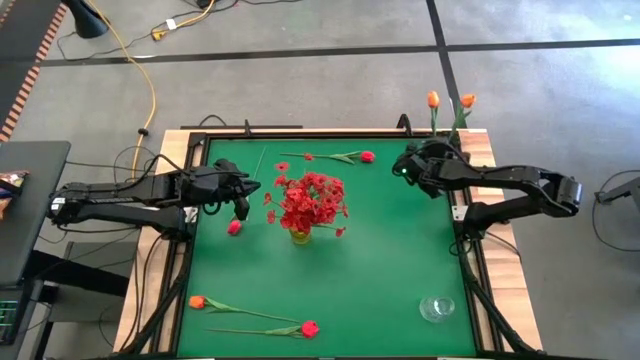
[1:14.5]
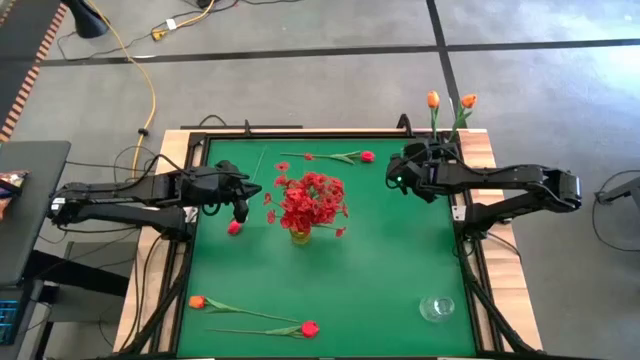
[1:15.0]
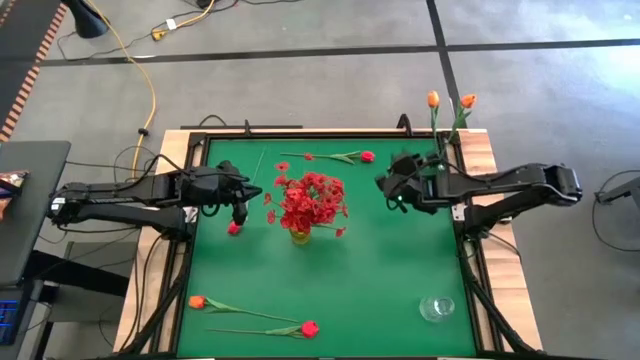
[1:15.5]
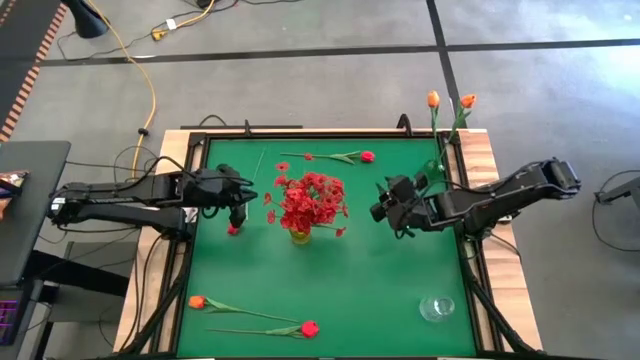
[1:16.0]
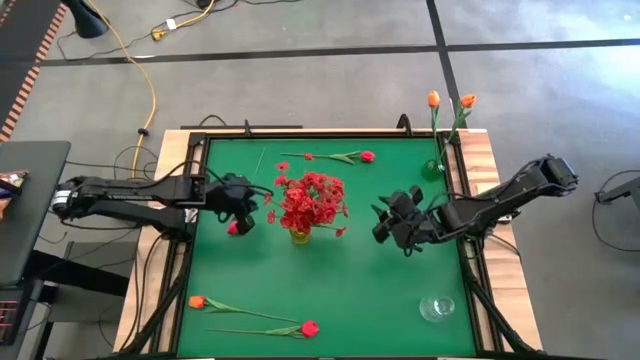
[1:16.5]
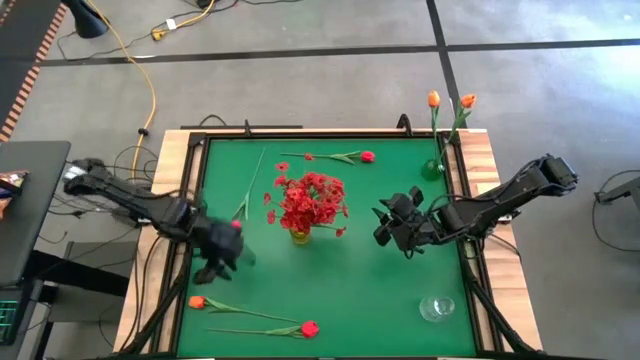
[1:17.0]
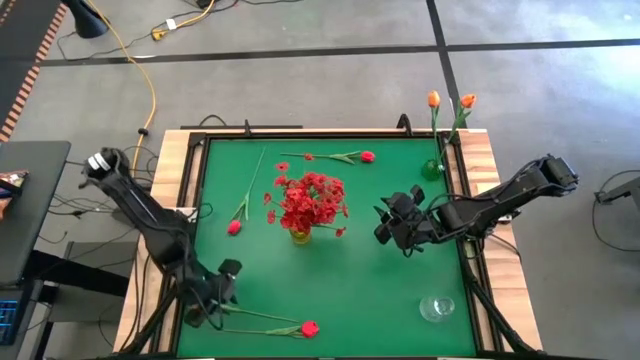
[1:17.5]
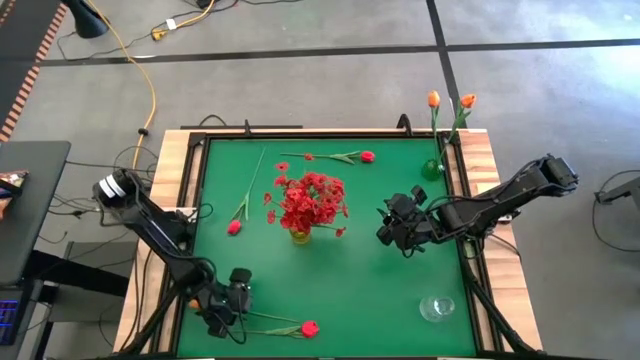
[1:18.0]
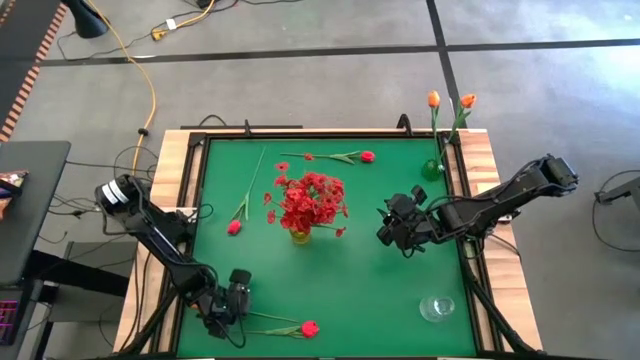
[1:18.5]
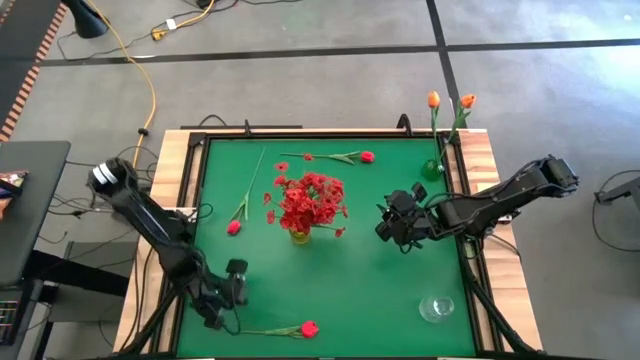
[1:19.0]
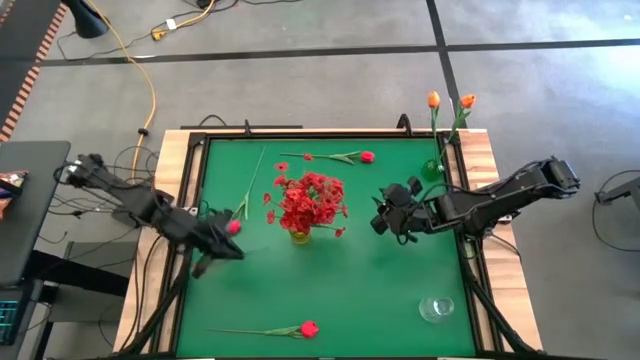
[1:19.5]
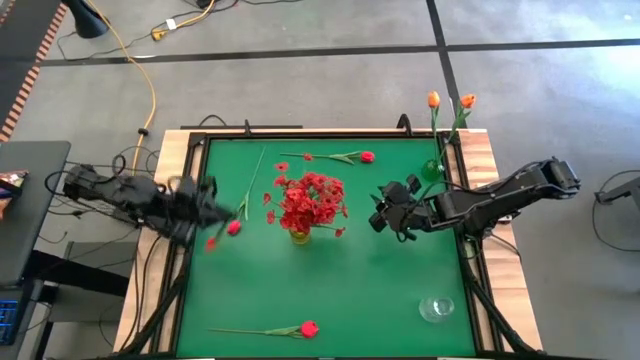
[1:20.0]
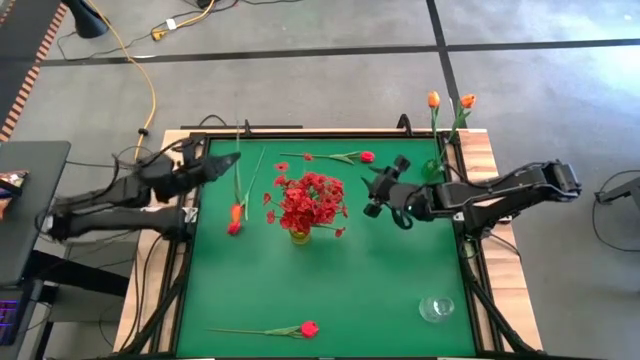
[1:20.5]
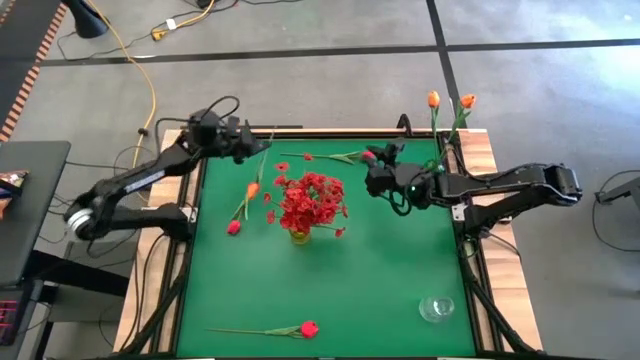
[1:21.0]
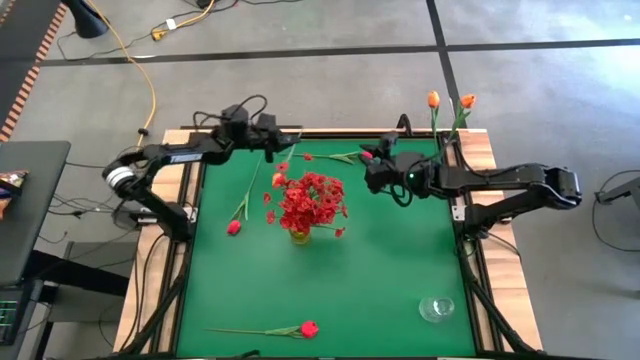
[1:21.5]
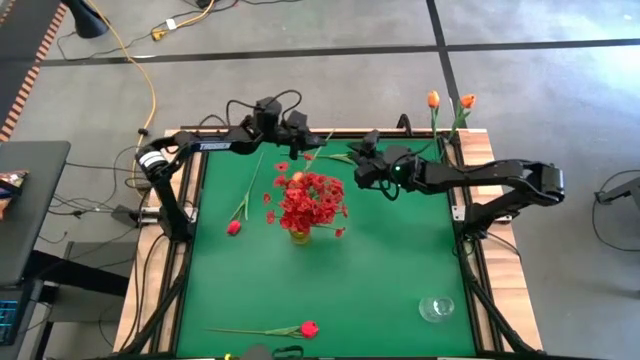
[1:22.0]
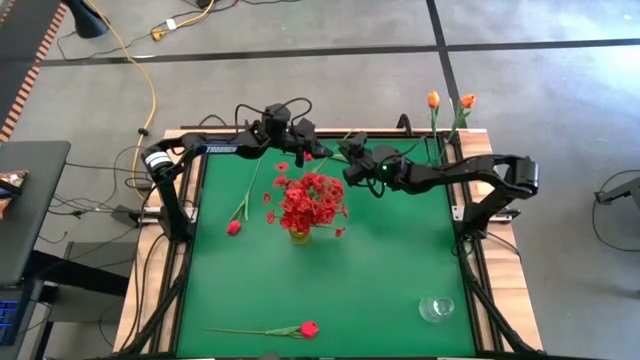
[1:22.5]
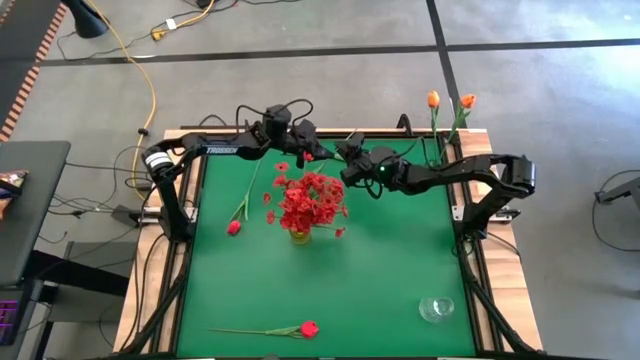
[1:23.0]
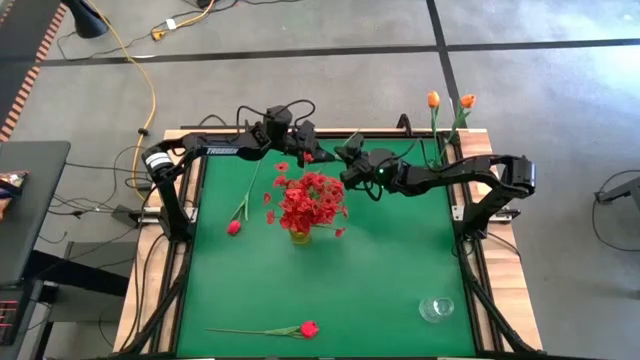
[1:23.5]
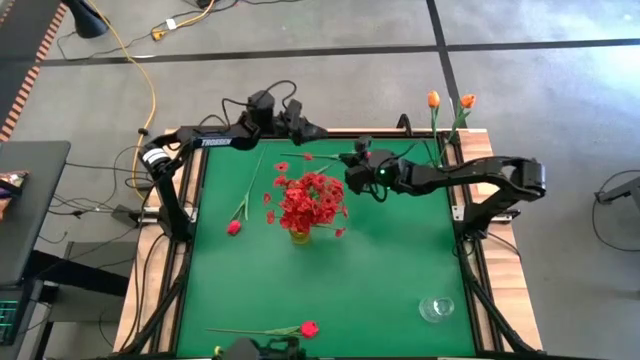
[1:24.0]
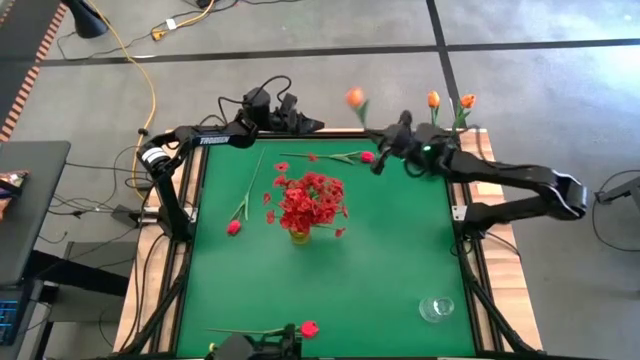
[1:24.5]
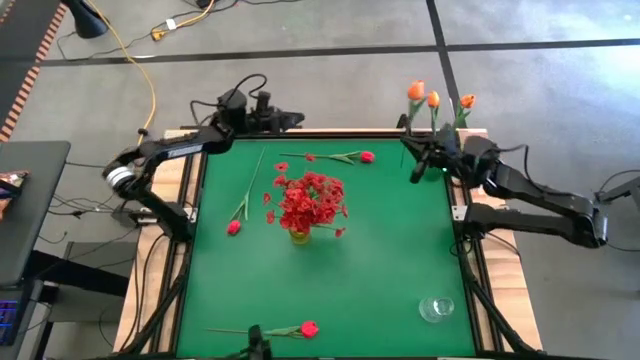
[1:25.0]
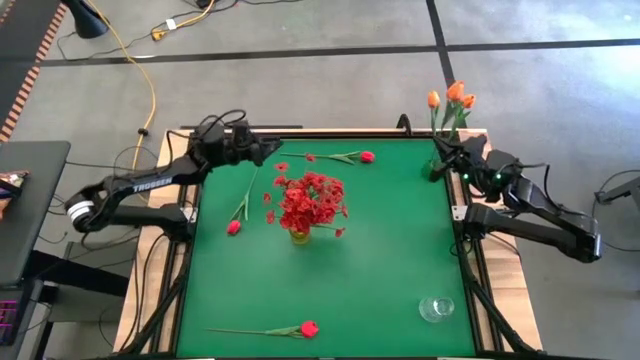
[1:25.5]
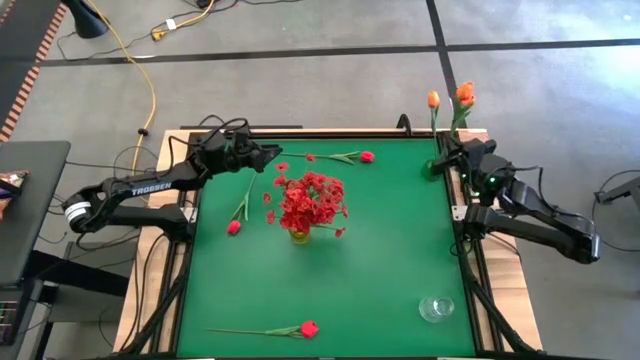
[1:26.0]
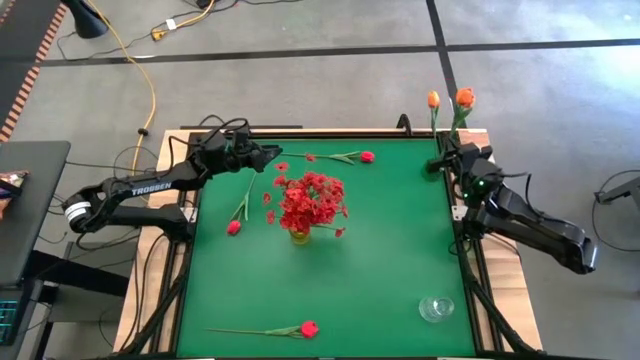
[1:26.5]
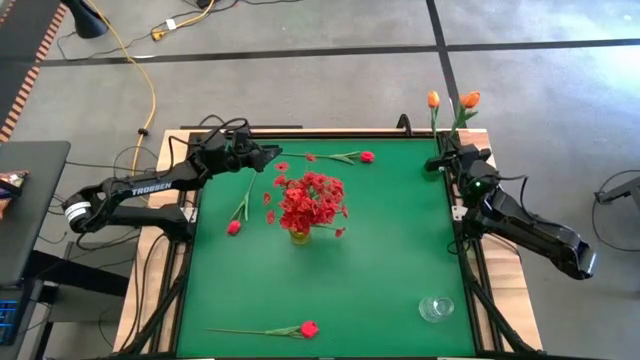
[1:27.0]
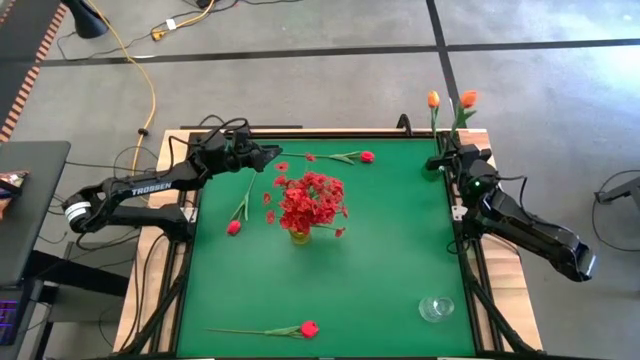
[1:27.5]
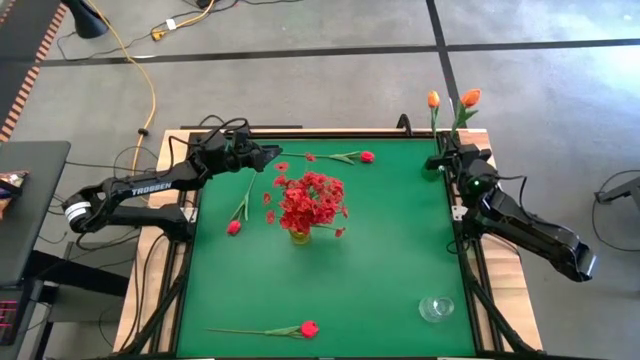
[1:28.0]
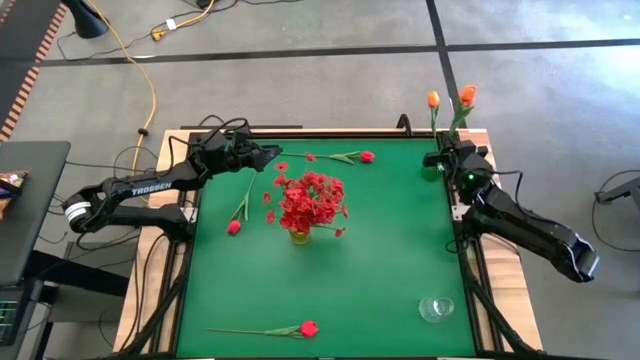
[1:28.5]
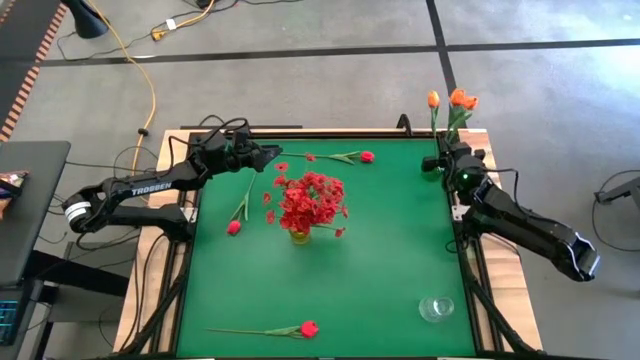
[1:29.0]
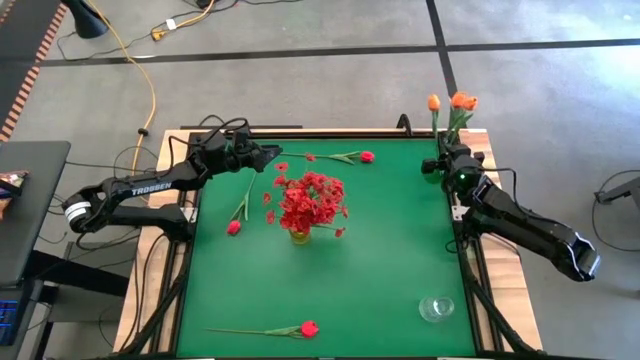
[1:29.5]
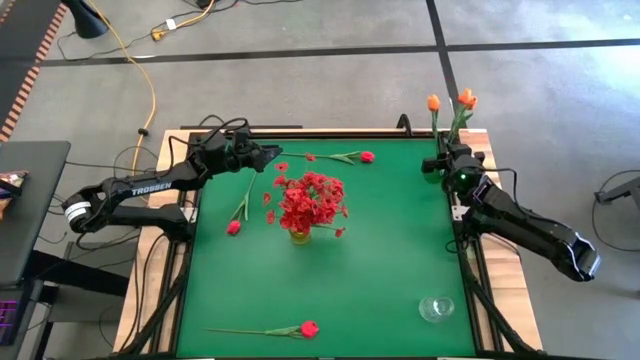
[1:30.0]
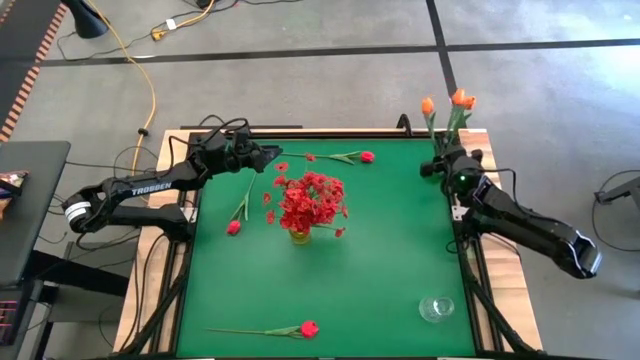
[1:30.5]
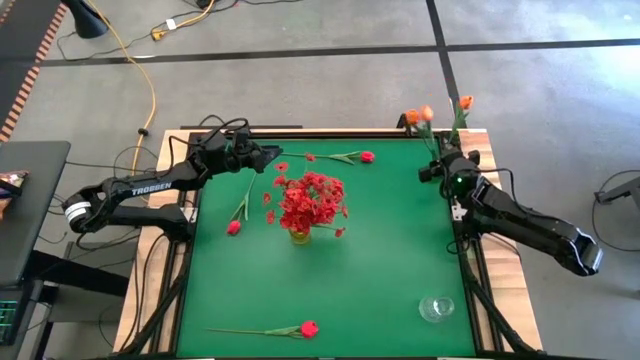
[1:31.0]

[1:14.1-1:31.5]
Task: Sort flowers into vase by color
Put the orange flower into the green vase

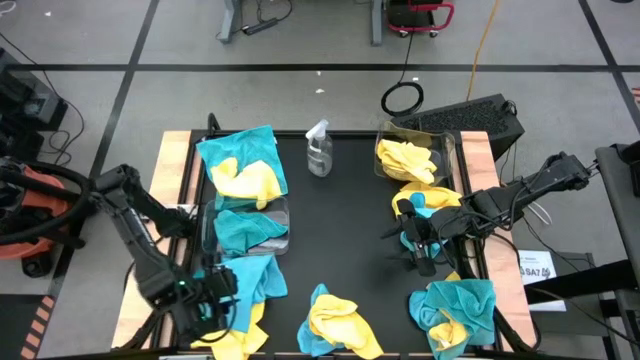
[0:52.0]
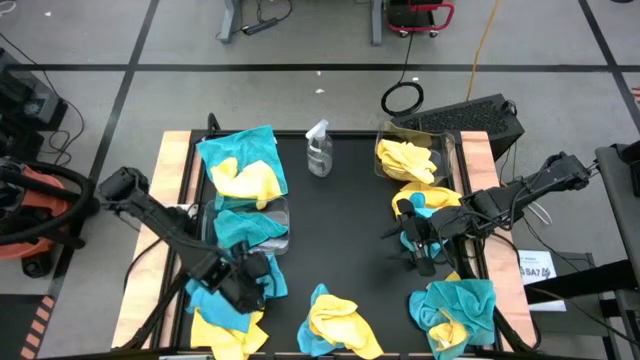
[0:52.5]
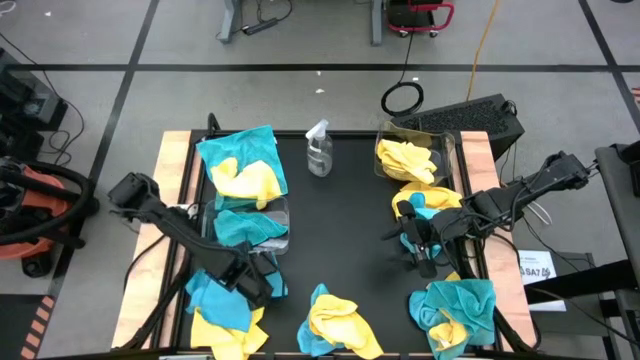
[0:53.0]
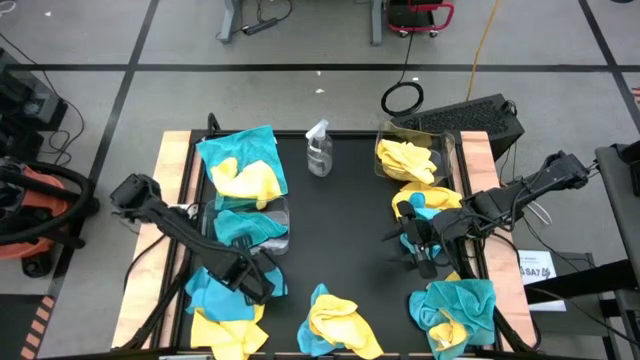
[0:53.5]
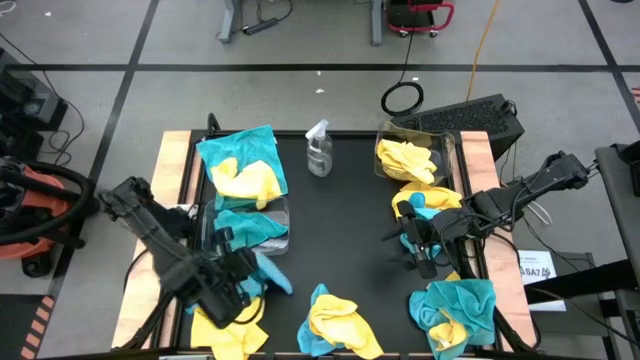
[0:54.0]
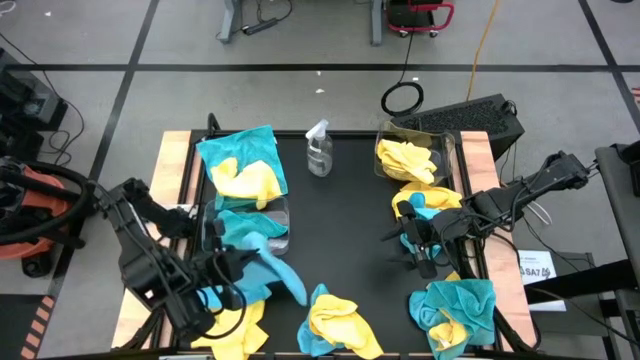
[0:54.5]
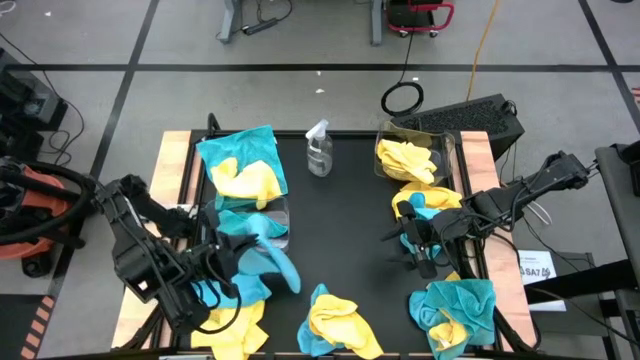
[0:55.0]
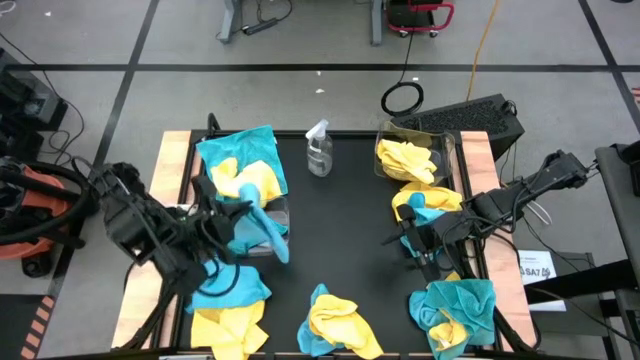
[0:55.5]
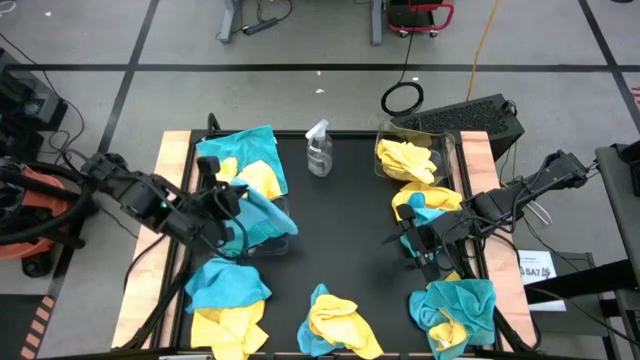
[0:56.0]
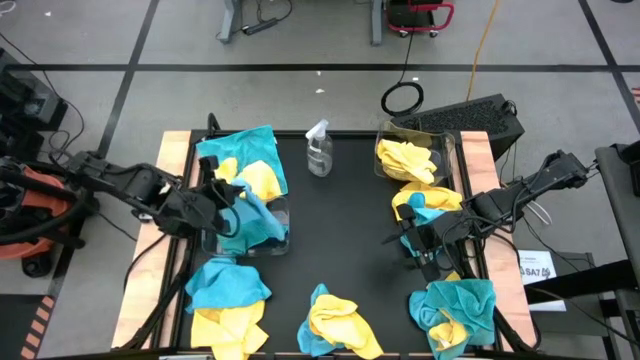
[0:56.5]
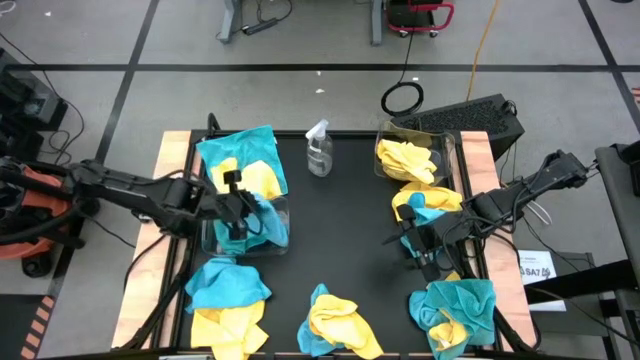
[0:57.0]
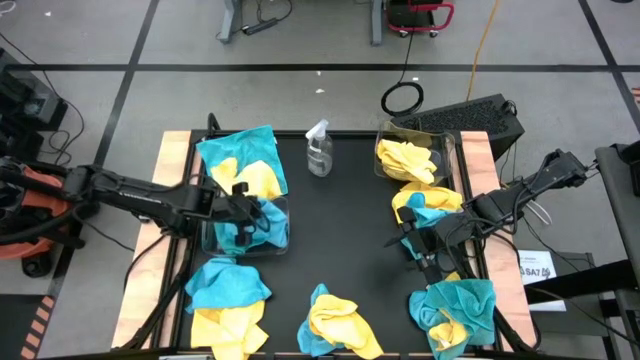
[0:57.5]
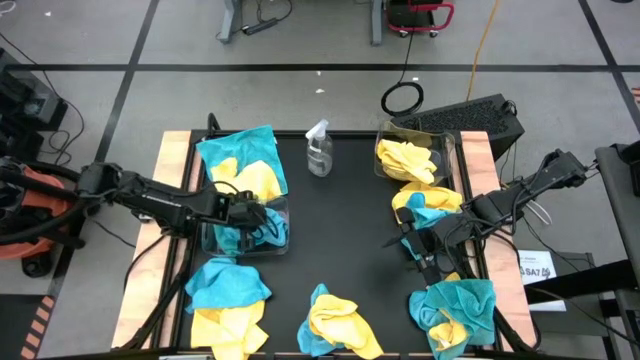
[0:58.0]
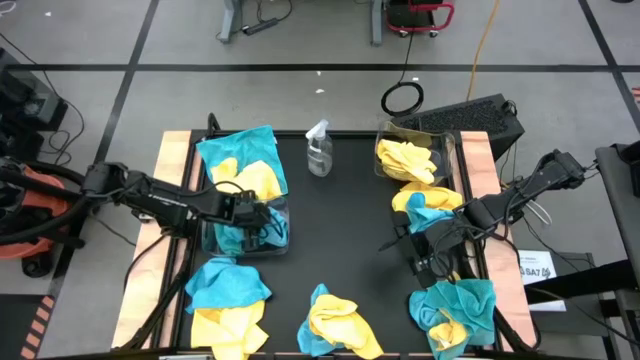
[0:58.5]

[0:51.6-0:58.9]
Task: Sort microfiber towel by color & place in baskets
Put the blue towel into the bottom transparent bin
